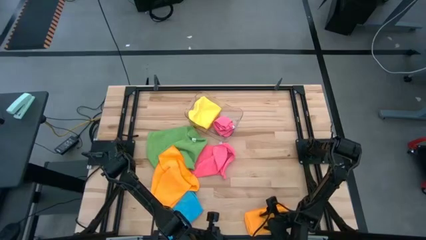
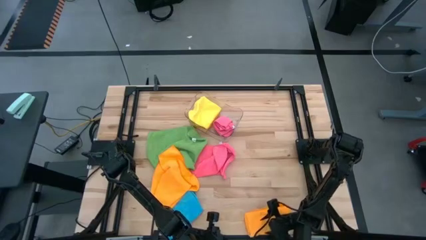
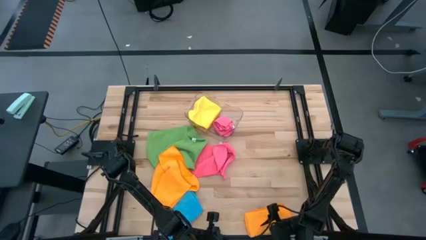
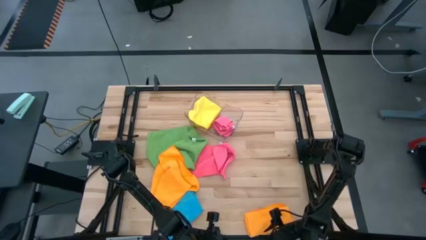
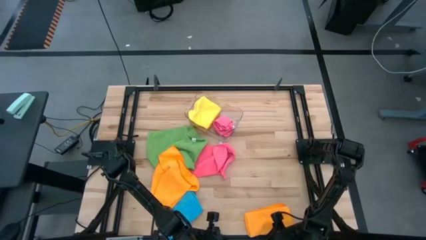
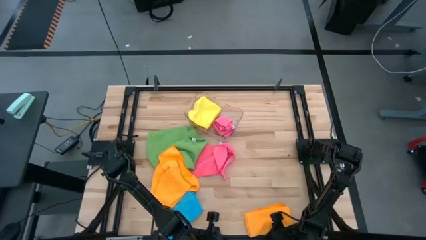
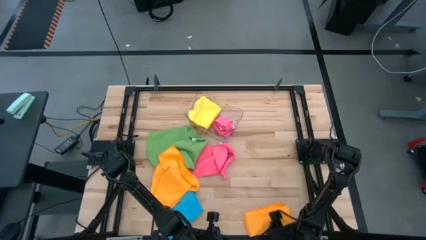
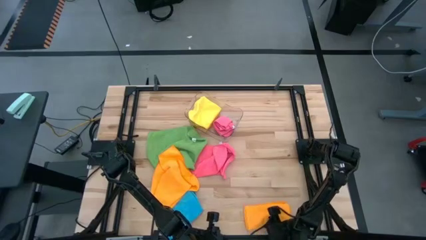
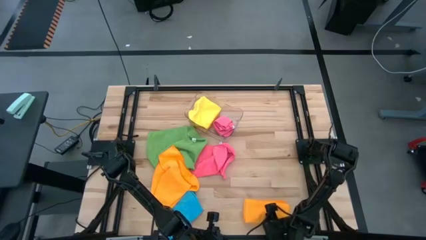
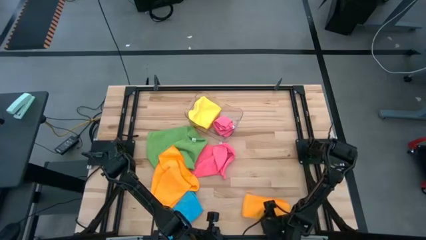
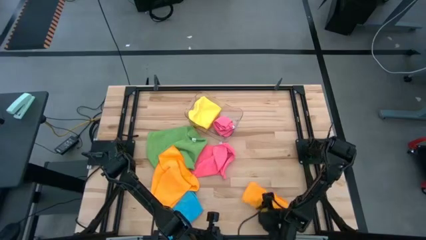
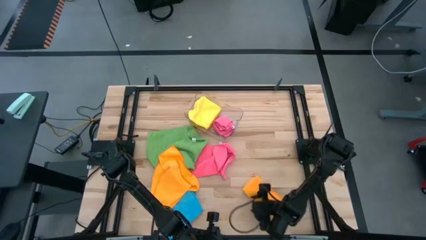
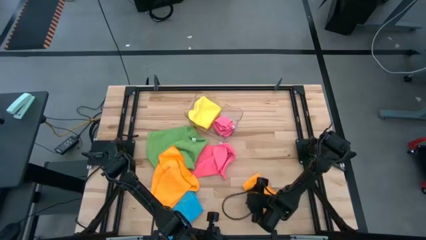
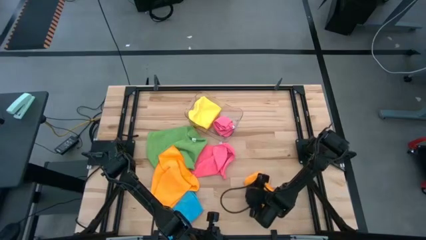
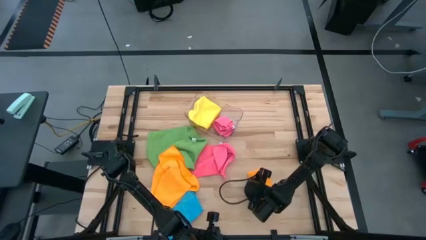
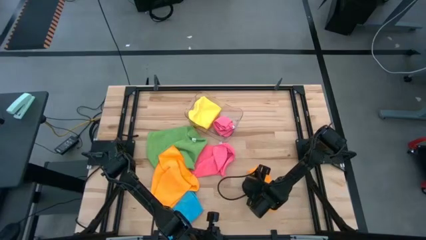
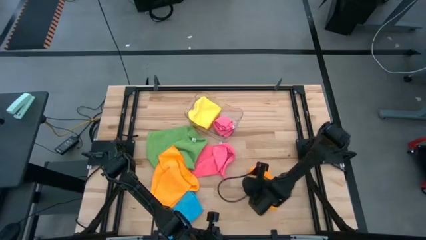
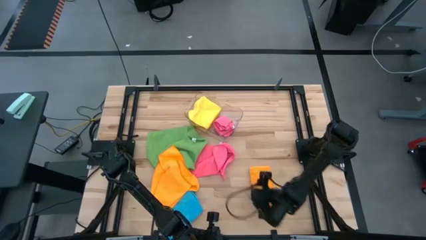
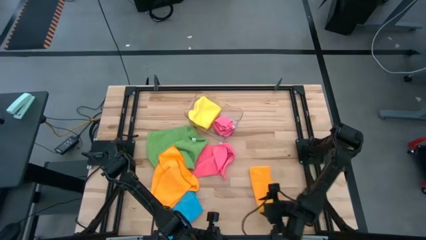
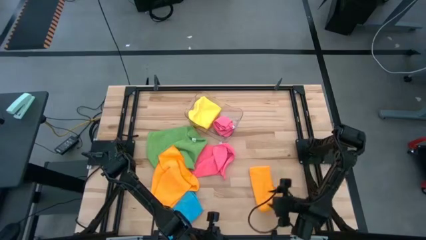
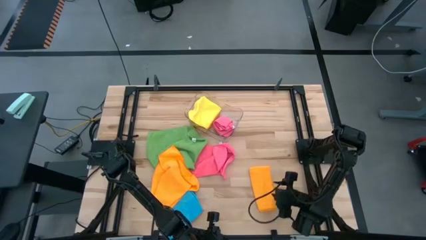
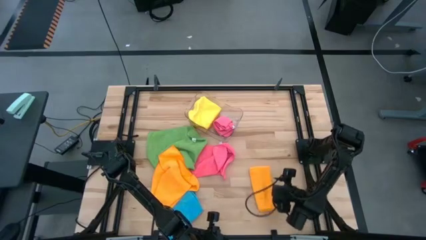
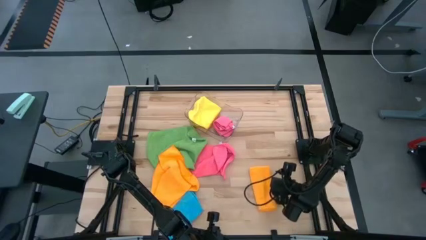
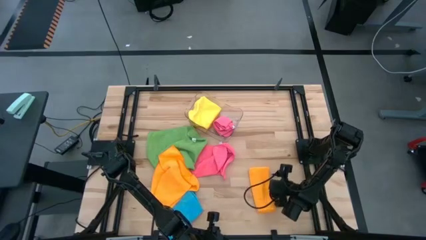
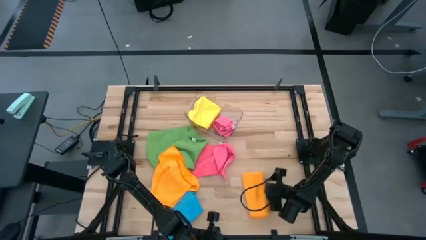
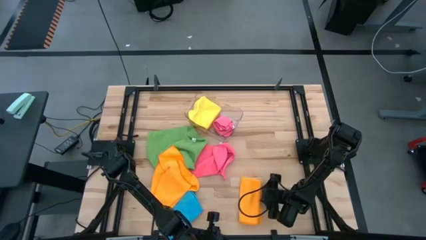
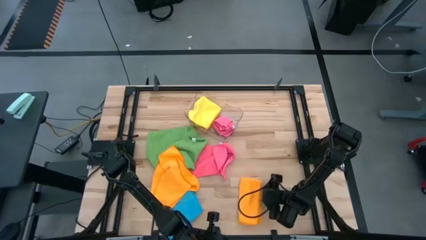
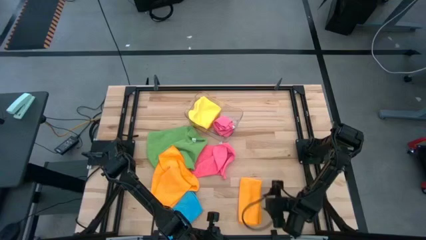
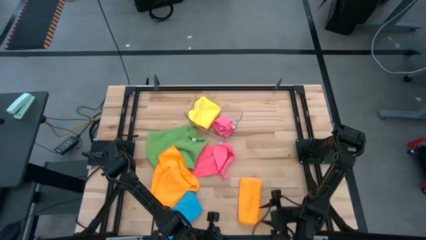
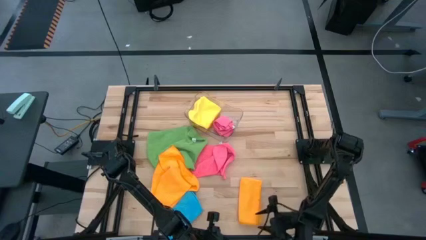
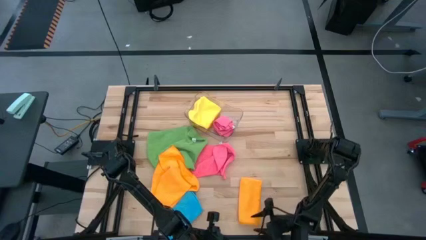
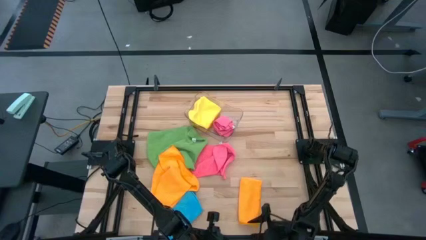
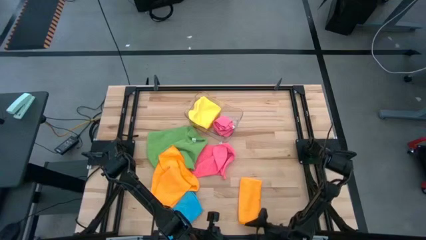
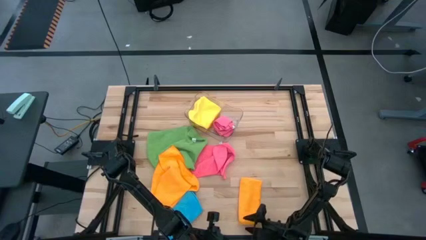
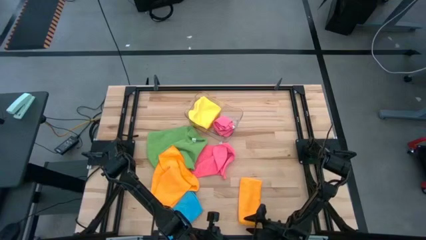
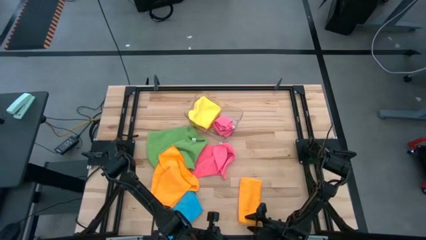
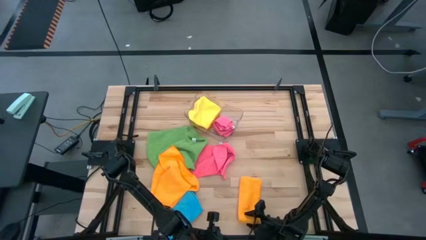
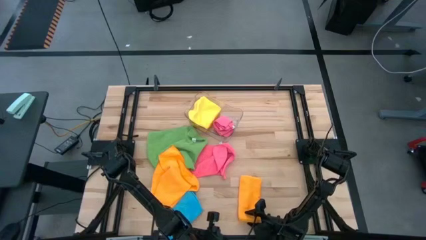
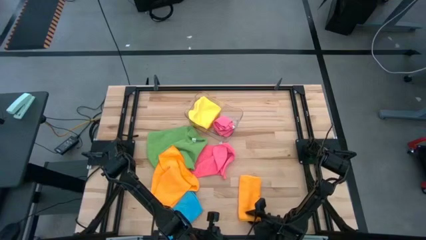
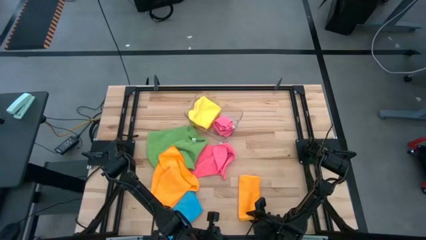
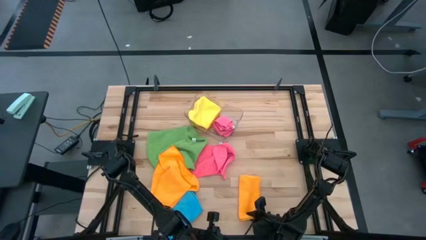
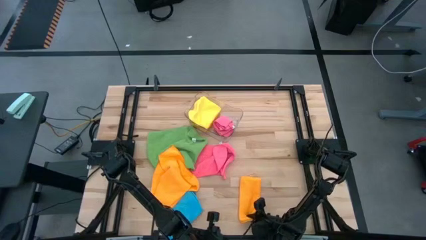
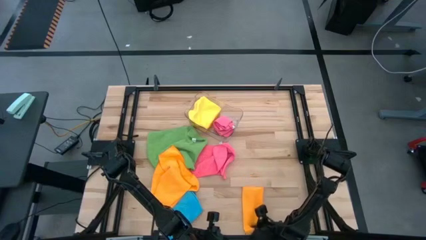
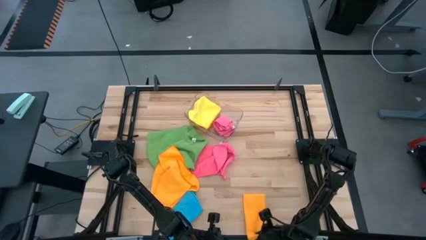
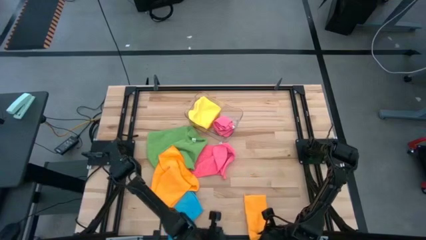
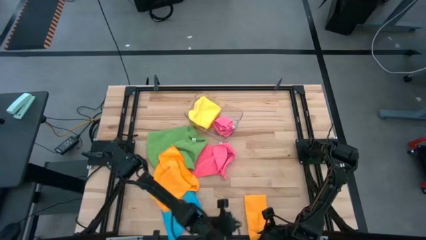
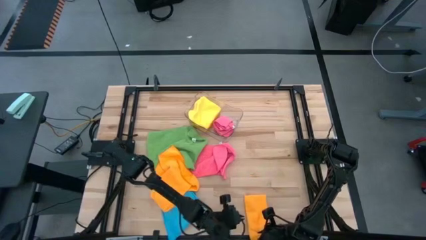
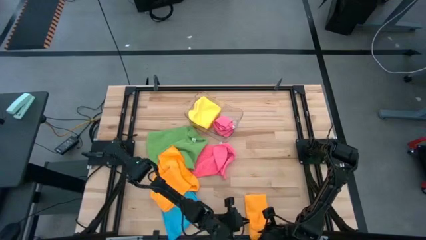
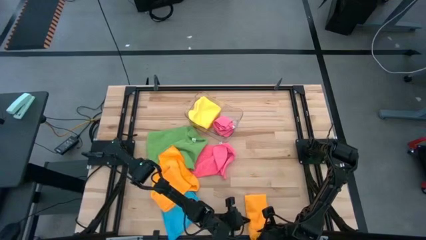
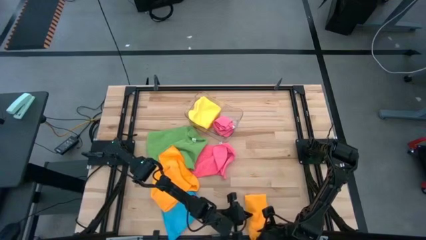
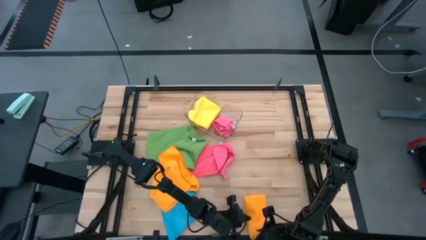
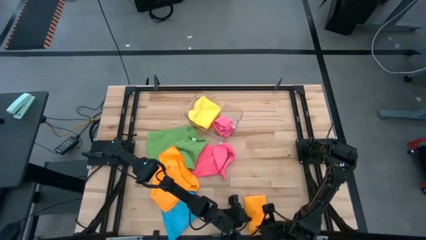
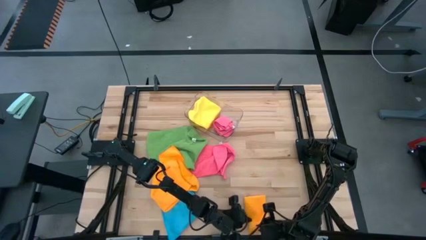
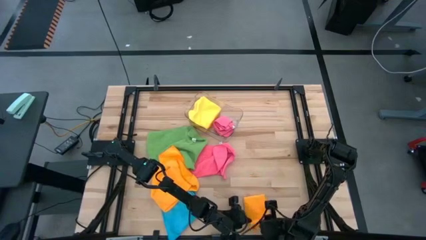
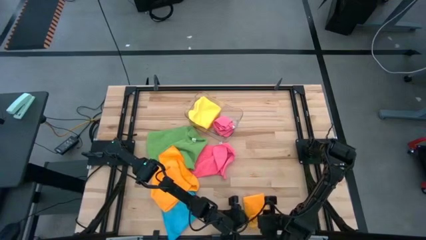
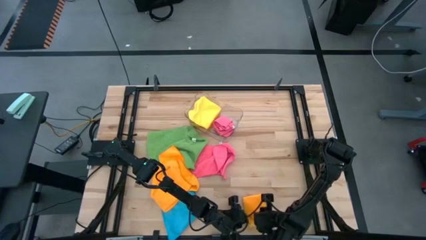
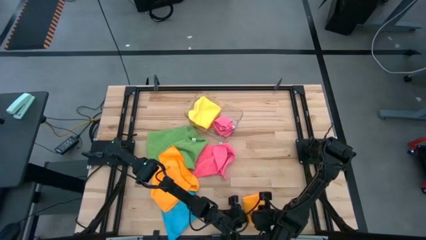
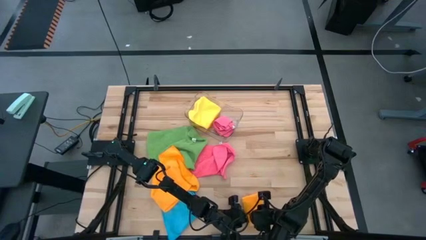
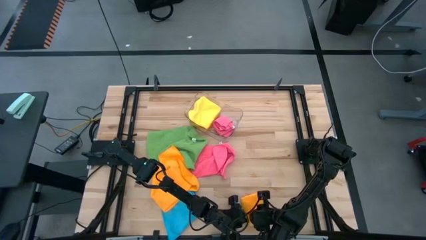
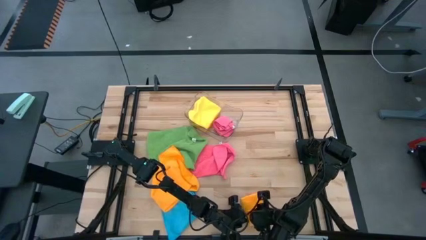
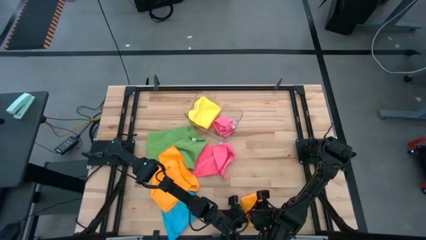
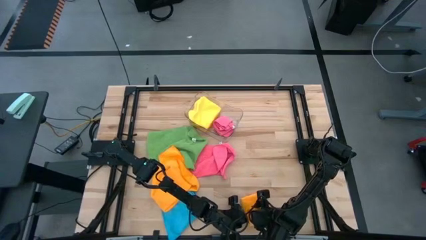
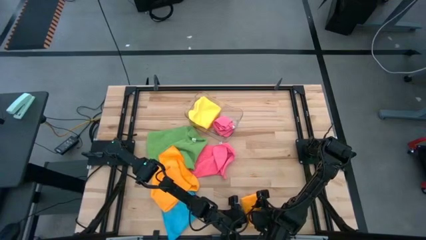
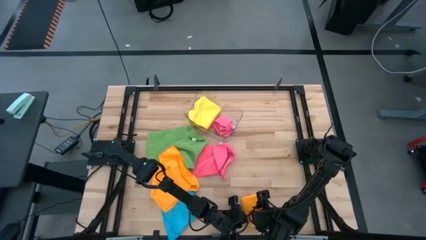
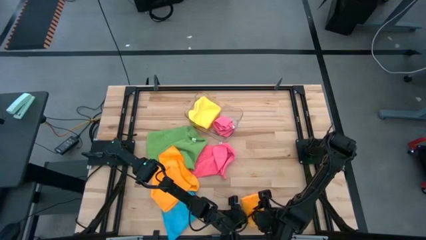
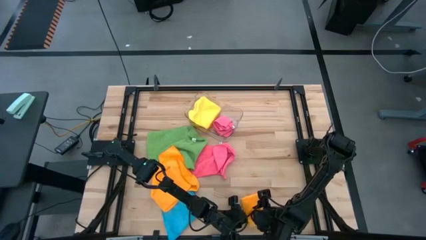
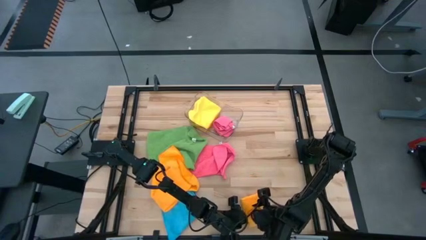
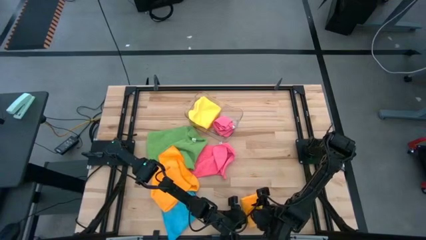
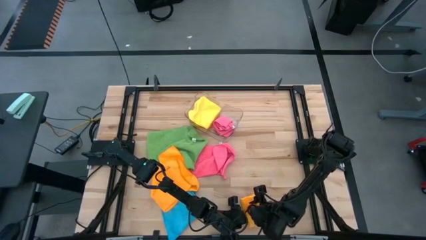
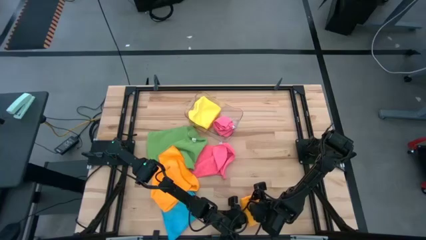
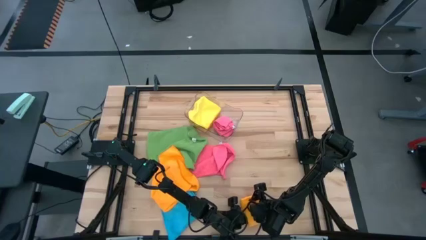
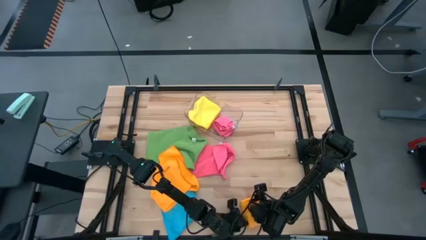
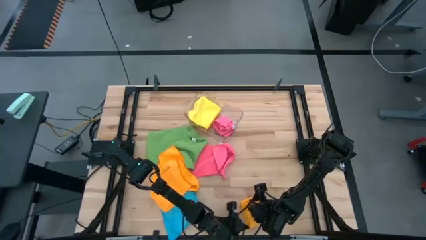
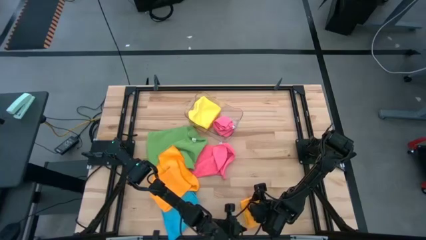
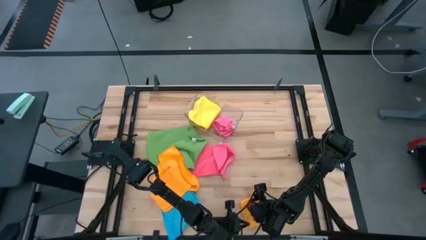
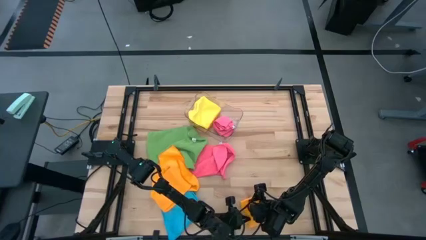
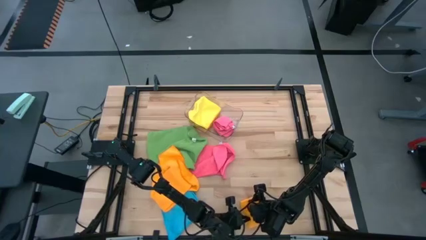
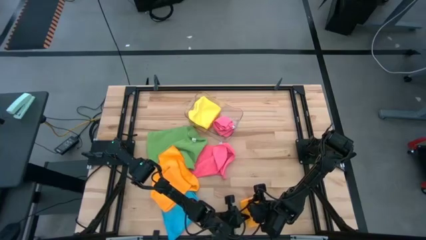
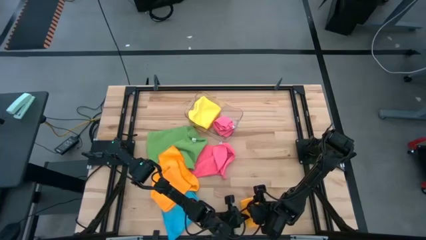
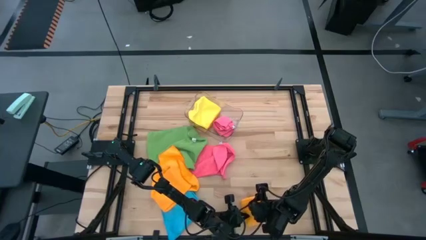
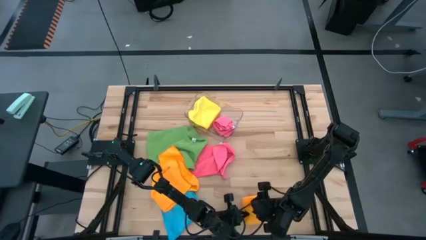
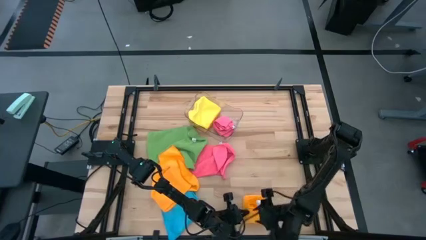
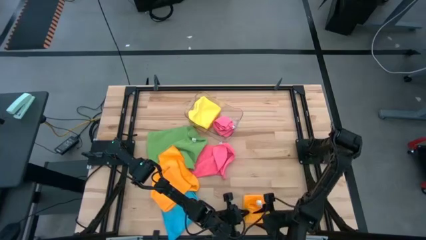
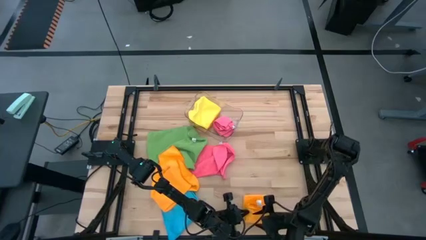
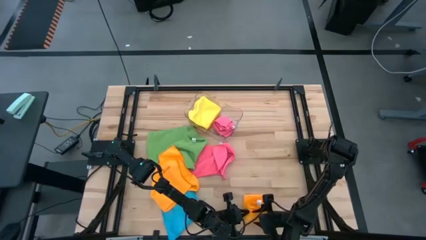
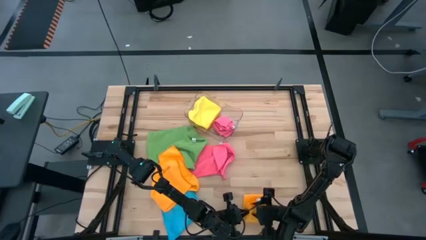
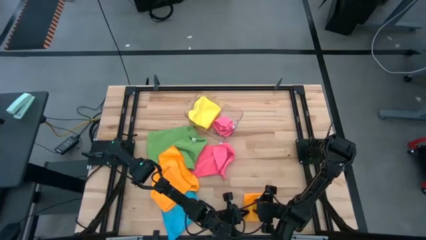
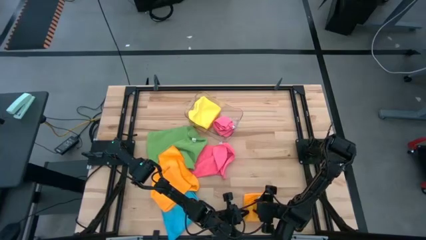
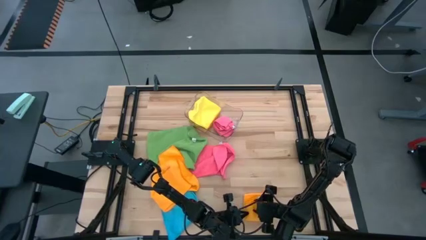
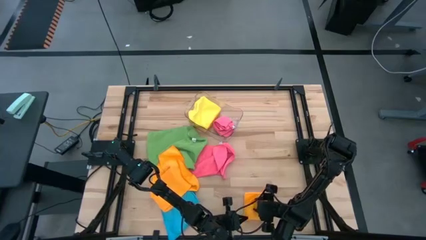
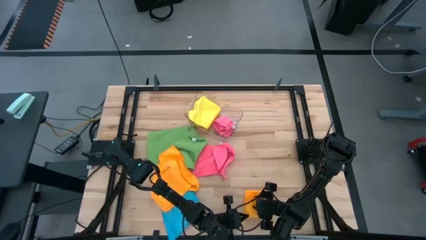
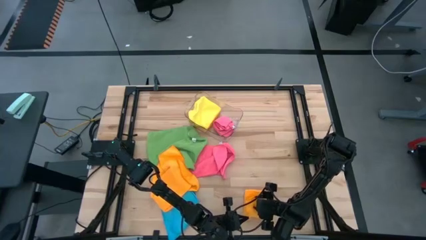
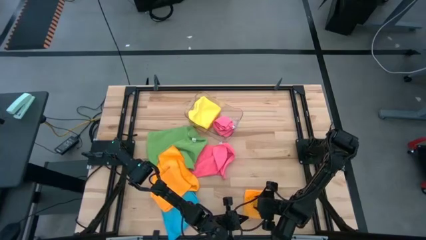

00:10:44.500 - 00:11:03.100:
Task: Fold microfiber towels
Fold the right orange microfiber cloth
